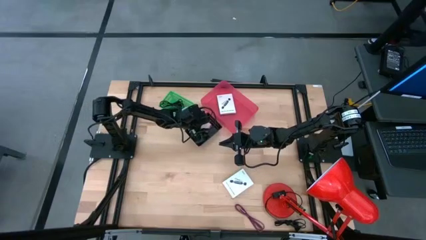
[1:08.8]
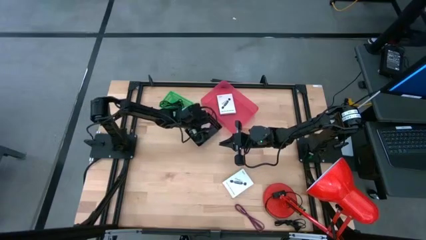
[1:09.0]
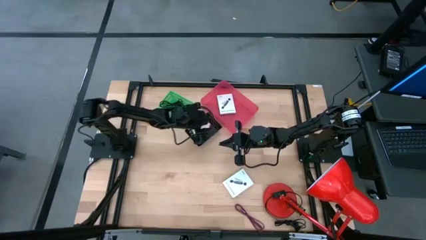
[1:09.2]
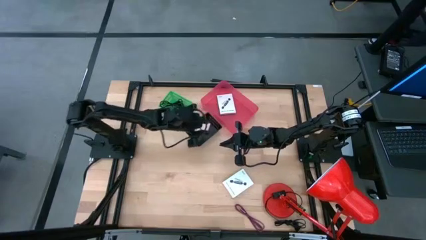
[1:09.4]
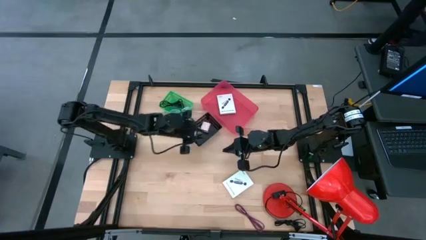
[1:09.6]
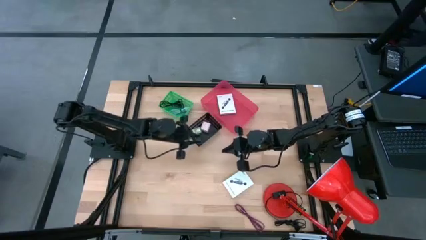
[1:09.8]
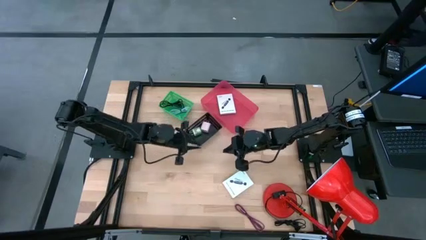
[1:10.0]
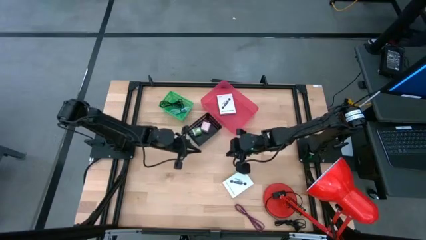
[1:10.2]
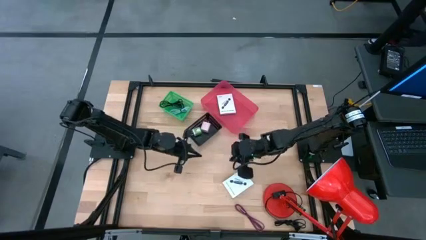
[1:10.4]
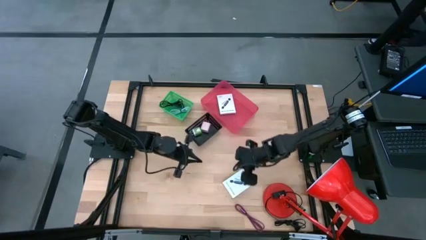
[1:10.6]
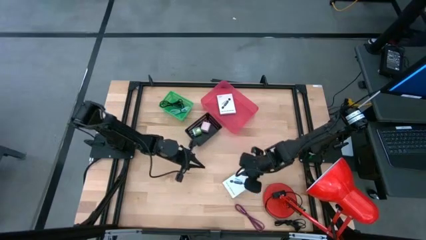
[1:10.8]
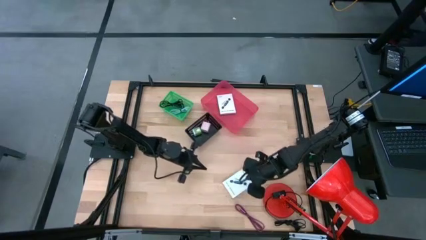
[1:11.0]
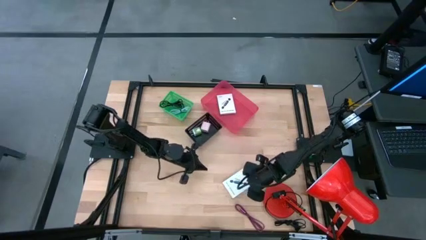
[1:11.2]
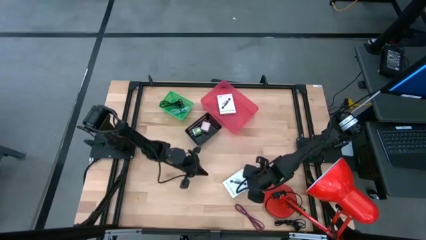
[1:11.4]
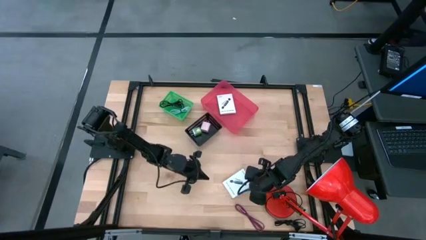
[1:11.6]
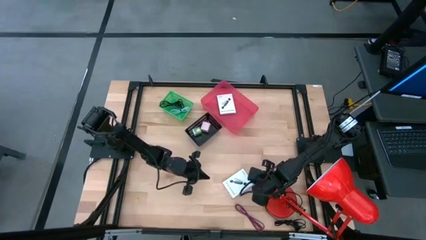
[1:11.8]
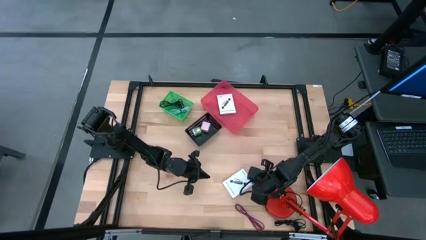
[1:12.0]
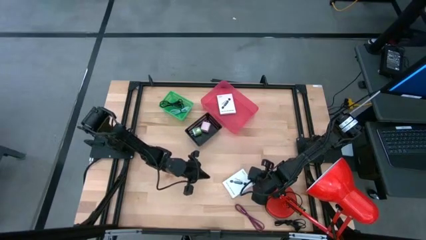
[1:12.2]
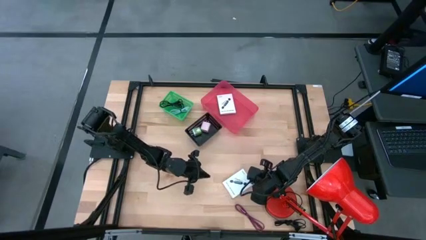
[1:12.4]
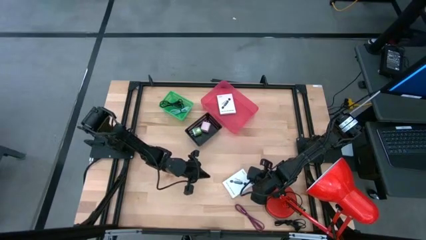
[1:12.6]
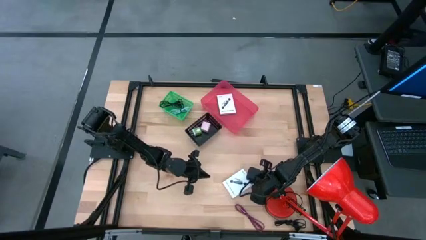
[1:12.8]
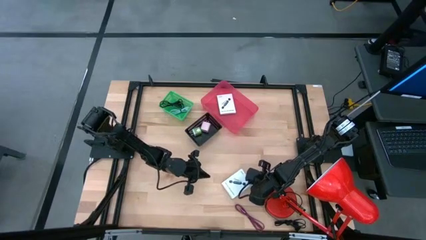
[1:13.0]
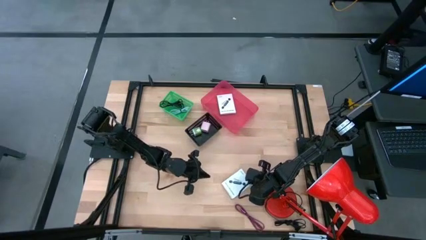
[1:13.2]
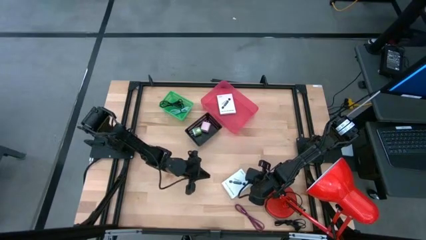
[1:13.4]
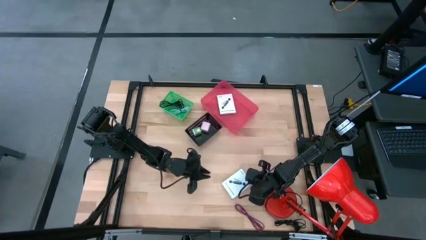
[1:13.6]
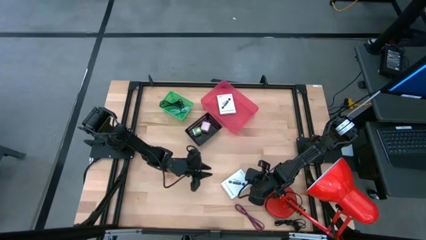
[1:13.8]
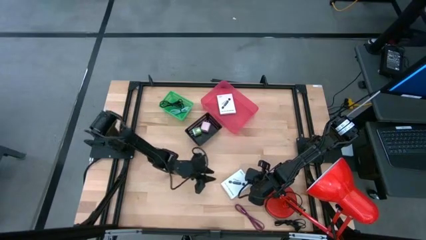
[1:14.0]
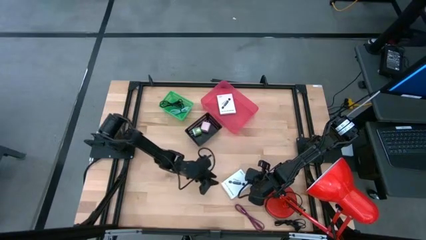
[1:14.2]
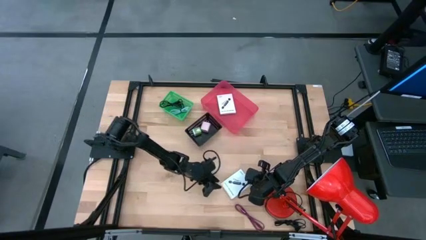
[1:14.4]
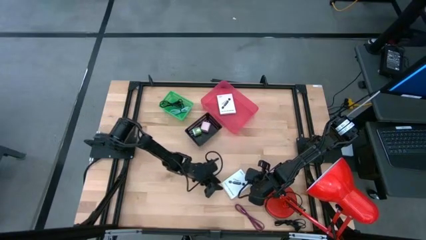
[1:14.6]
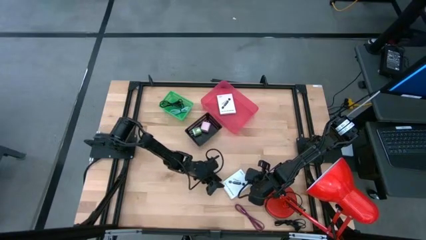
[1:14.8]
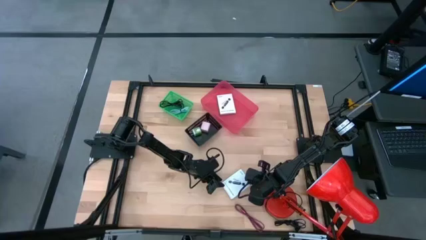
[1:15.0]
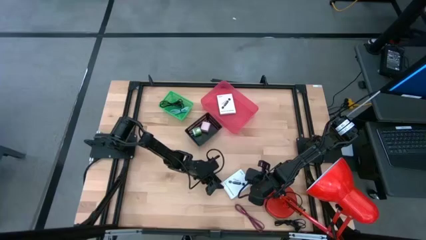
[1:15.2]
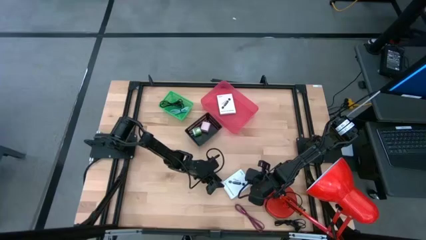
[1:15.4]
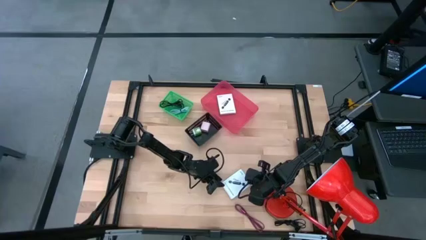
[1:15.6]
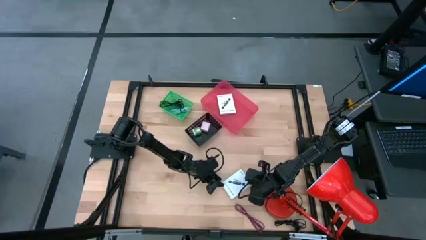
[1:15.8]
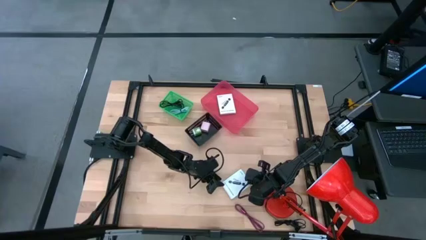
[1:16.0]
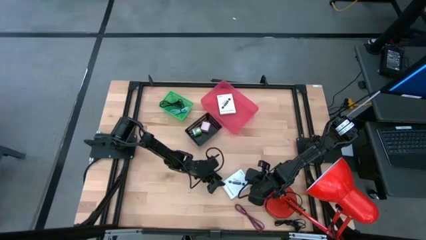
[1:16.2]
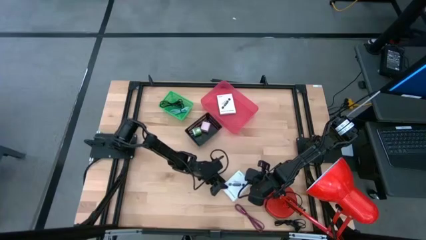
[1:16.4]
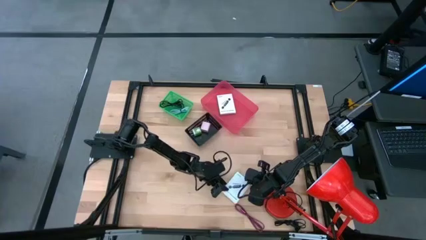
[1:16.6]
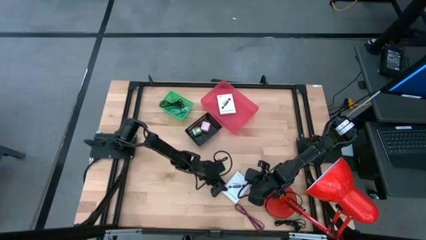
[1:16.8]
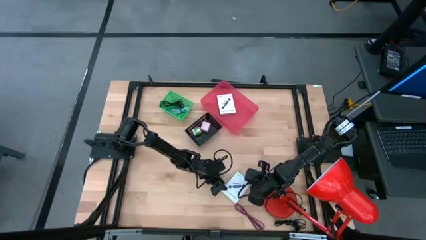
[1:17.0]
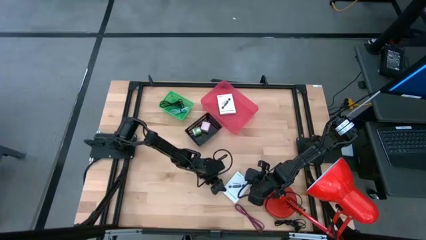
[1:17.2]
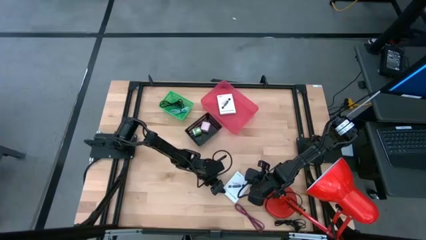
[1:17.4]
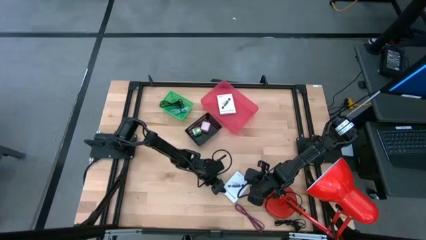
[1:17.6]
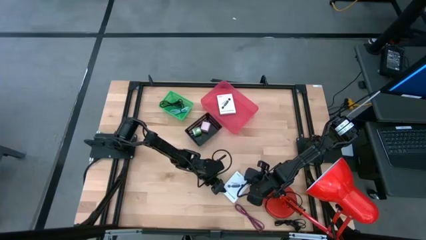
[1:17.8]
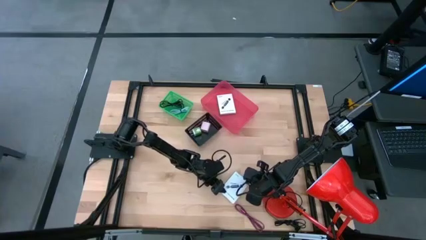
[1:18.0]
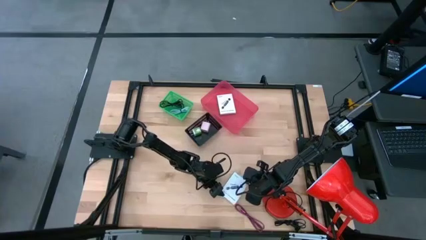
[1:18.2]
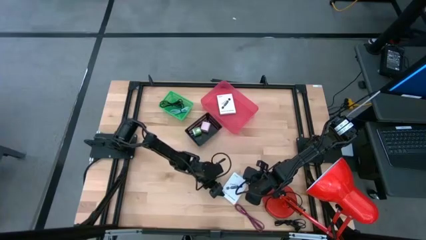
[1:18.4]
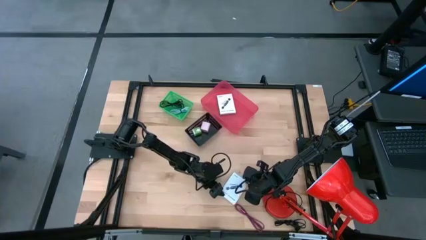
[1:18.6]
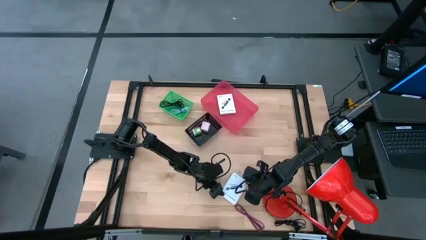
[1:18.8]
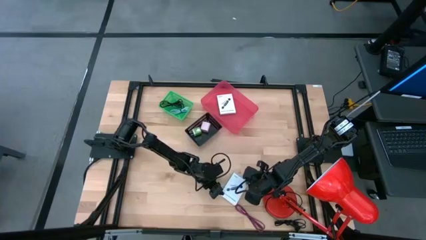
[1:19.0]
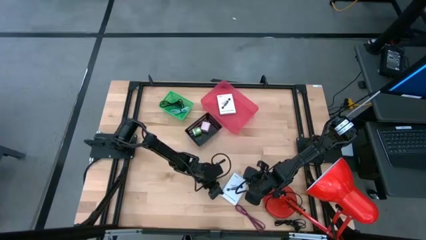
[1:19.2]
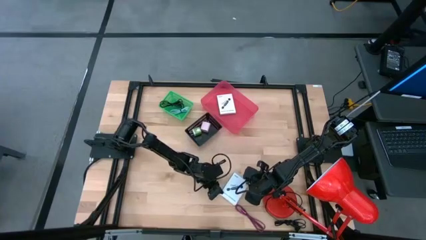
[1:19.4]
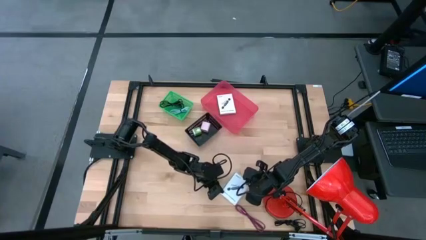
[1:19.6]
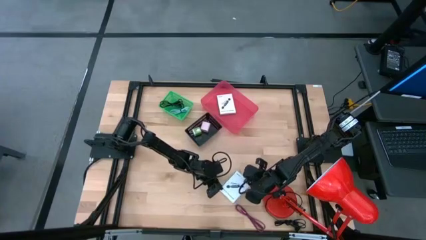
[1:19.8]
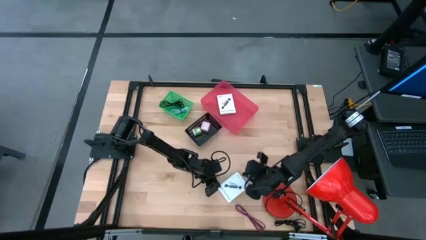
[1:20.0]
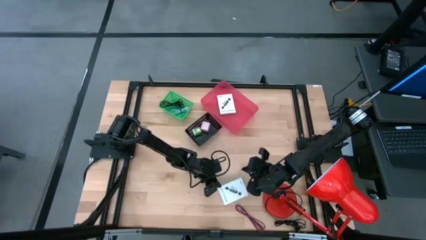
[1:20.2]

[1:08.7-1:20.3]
Task: Pick and place items into bin
Put the white card reader box into the red bin

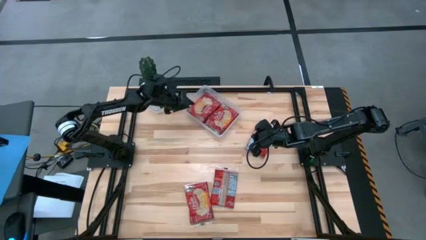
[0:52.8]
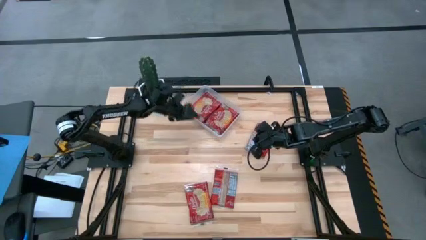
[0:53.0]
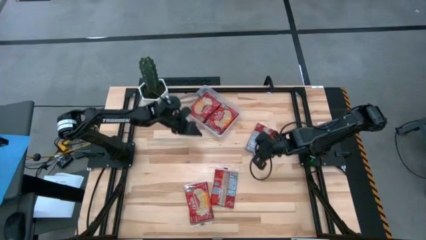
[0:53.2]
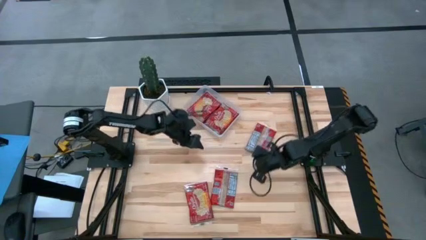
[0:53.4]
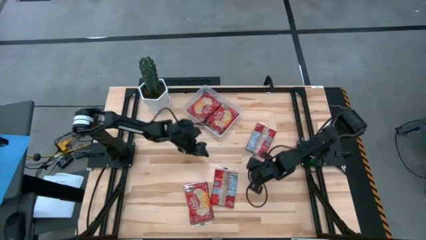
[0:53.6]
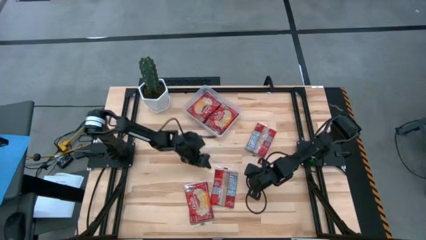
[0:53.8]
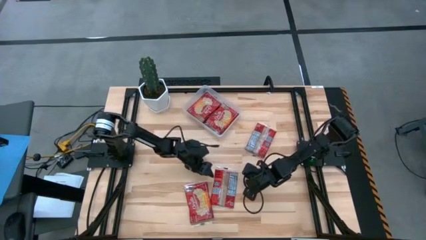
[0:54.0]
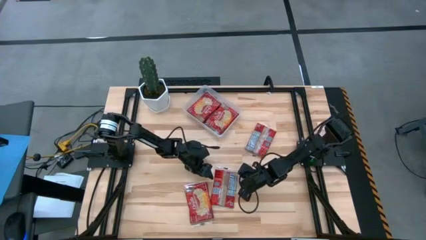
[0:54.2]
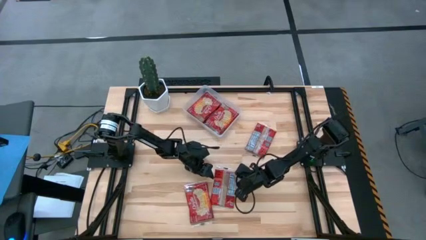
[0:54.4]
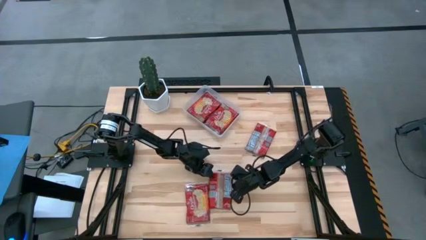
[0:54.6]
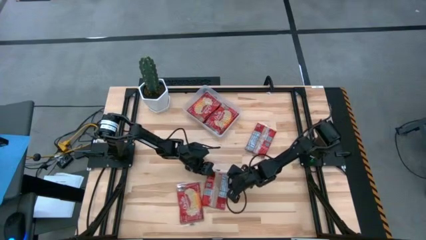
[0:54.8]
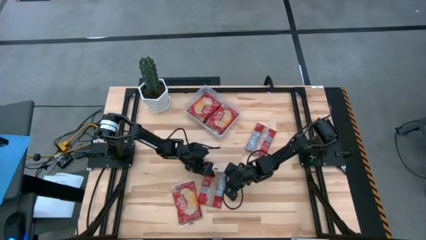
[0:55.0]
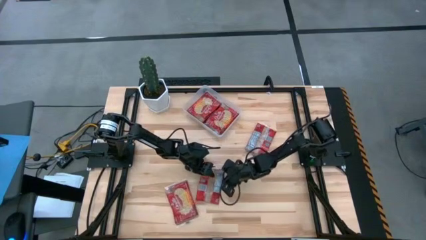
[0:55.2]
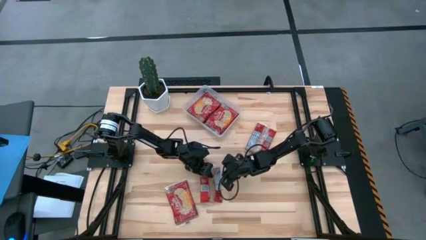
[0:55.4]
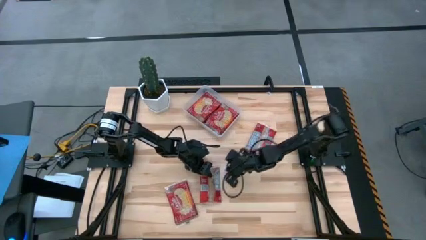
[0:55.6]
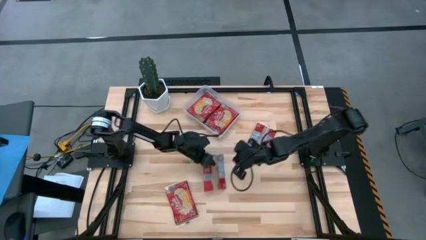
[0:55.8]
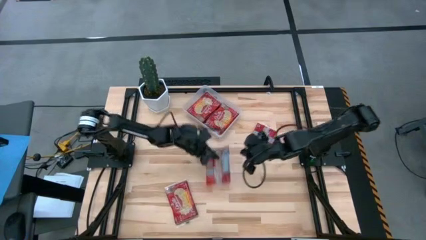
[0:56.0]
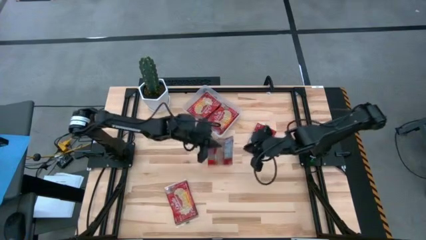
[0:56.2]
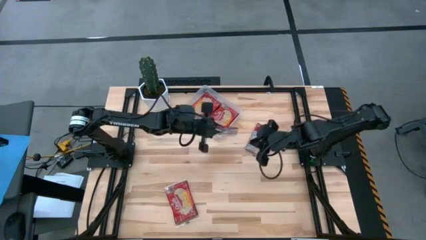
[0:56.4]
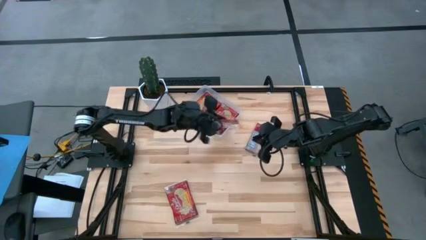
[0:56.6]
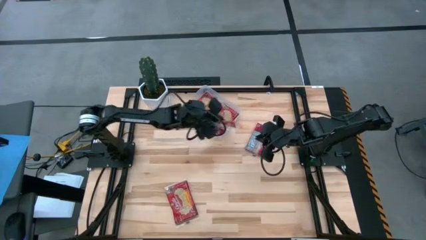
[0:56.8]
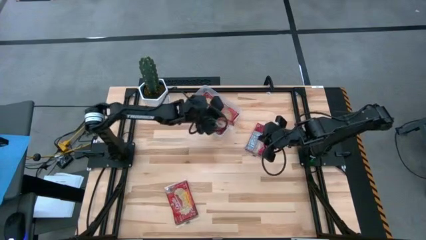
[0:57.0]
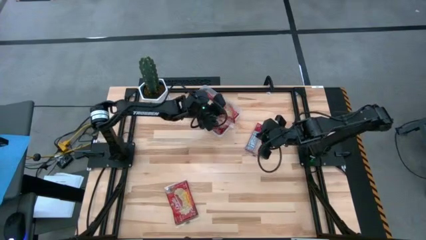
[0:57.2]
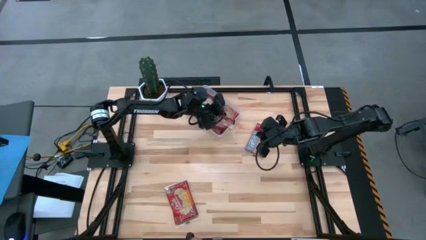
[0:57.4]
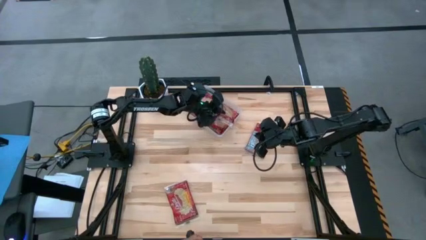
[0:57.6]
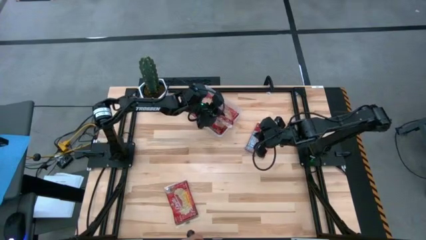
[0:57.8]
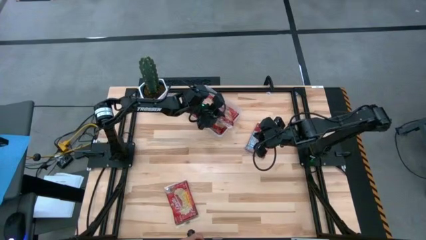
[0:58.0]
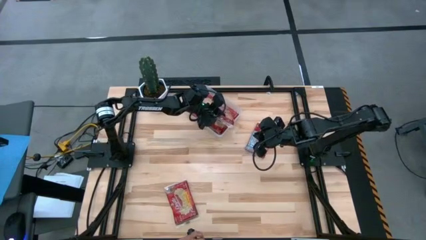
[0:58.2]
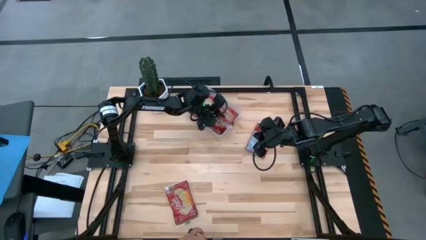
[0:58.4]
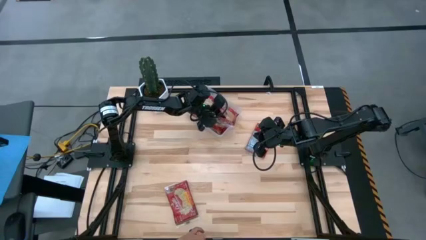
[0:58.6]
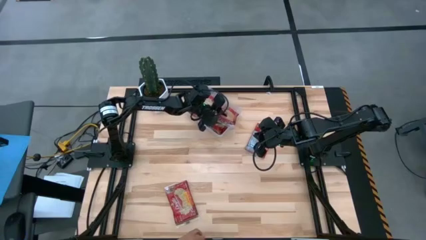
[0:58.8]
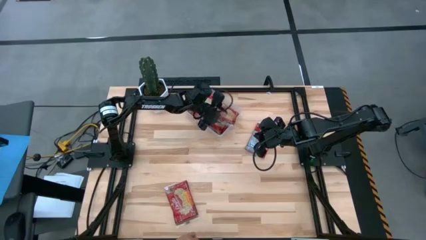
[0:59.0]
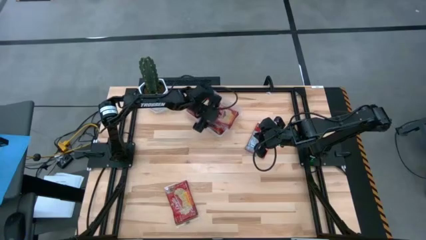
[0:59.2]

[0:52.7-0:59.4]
Task: Sort popcorn bags into baskets
Put the red popcorn bag into the transparent bin
